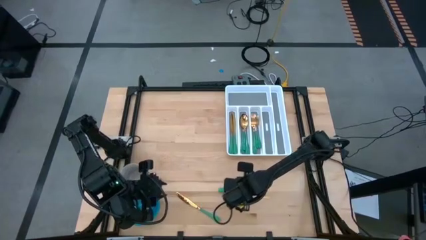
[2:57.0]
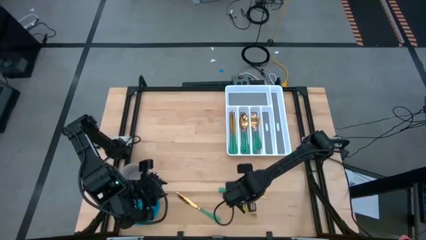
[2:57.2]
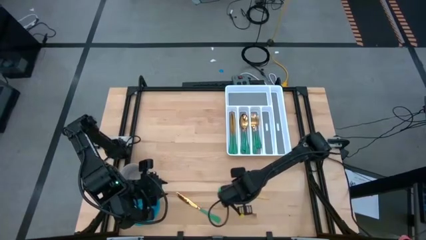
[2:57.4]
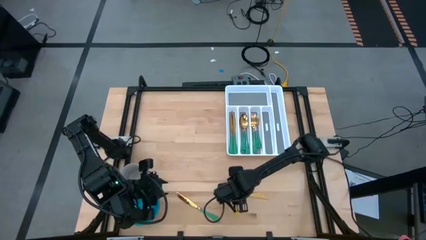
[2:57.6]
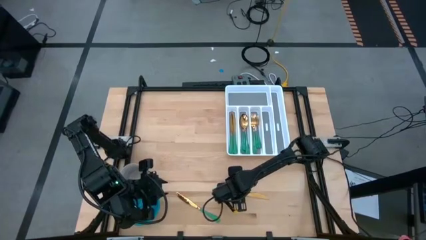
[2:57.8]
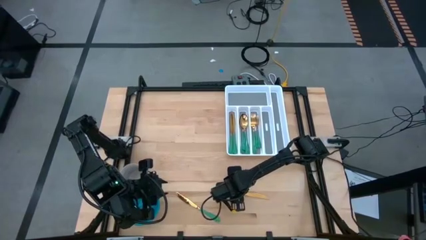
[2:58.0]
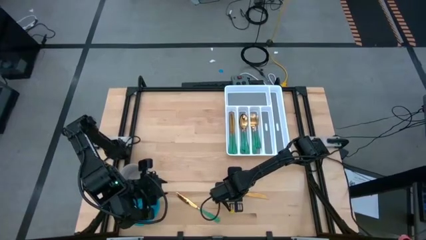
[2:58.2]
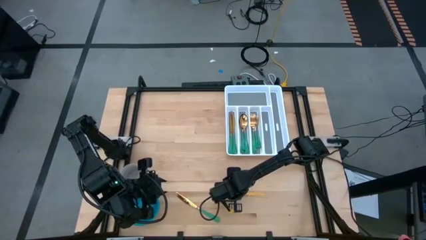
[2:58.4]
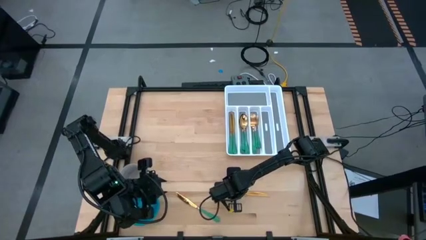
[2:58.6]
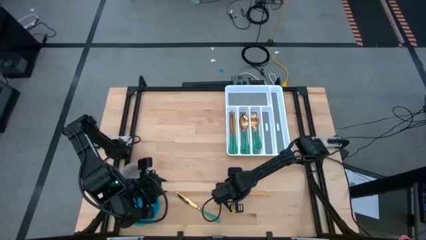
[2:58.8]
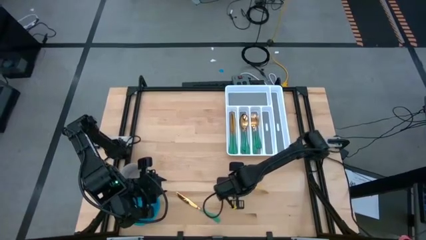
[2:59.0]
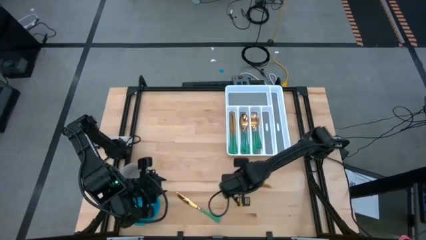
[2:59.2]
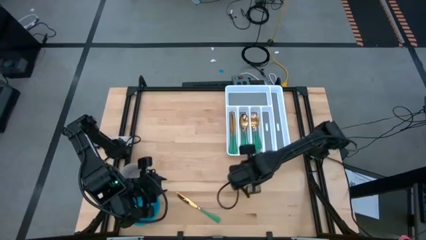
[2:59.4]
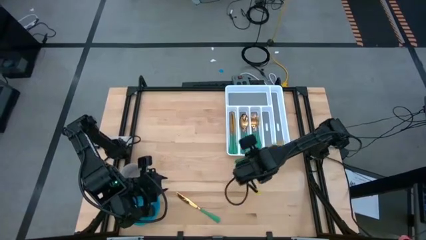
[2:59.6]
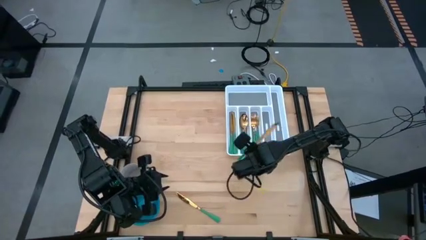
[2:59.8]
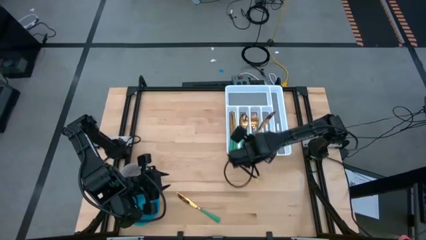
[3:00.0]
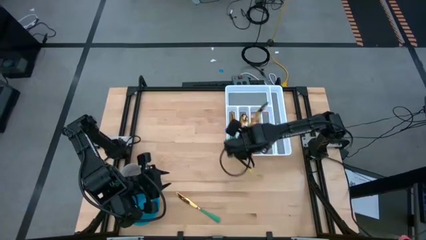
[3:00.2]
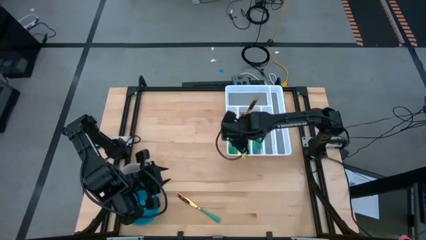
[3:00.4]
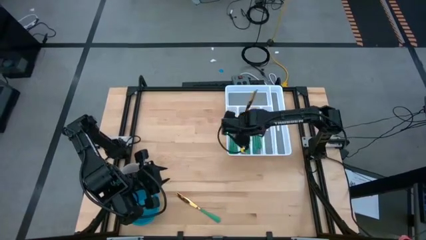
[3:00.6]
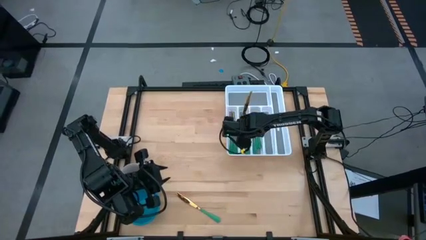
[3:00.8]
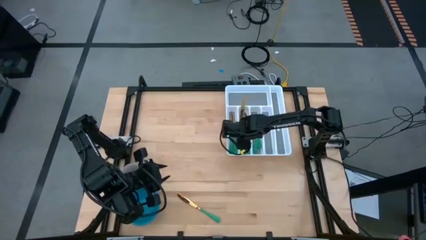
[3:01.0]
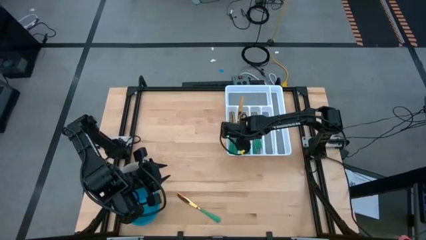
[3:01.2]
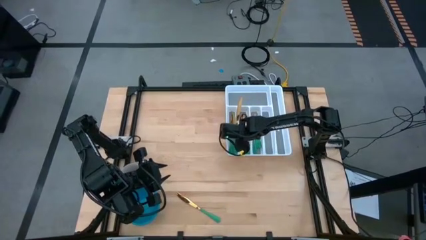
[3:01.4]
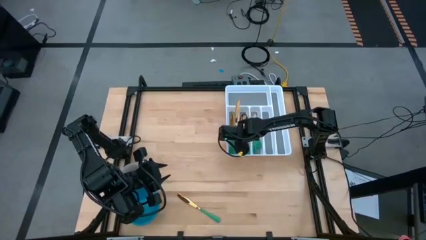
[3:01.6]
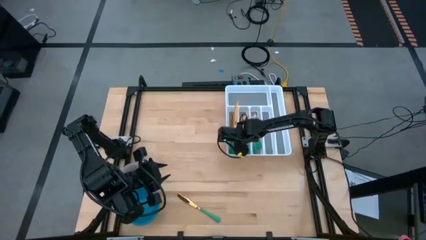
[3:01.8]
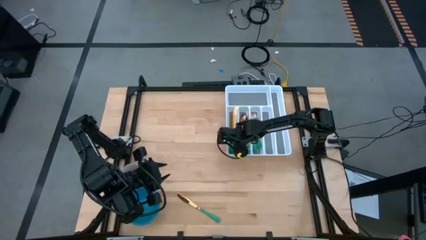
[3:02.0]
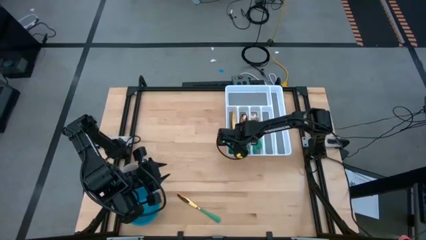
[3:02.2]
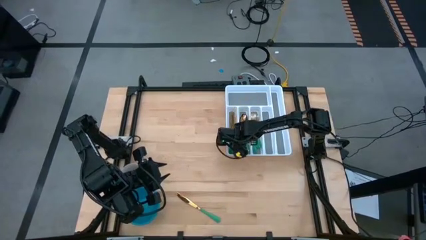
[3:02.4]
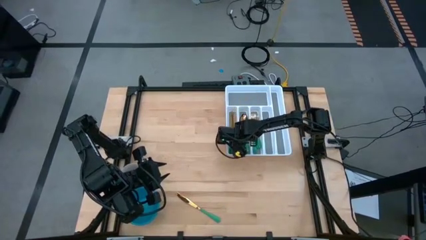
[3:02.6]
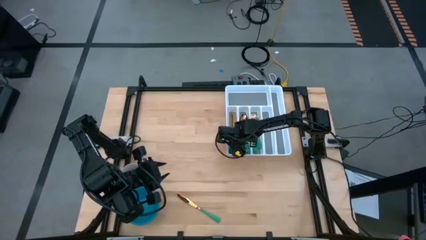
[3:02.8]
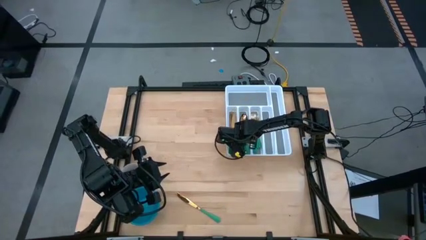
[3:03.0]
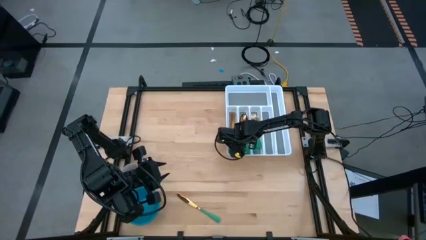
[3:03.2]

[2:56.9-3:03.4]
Task: Sort silverware
Put the right green table knife into the white cutlery tray

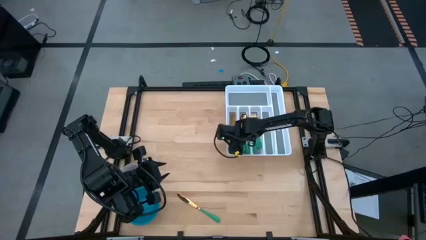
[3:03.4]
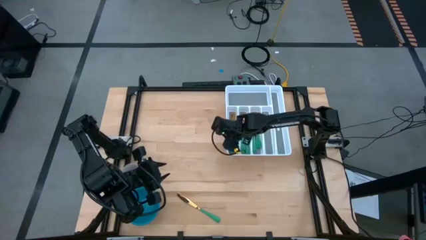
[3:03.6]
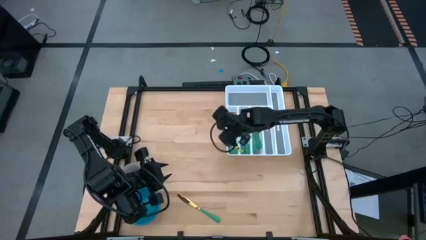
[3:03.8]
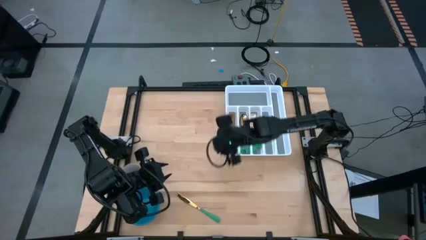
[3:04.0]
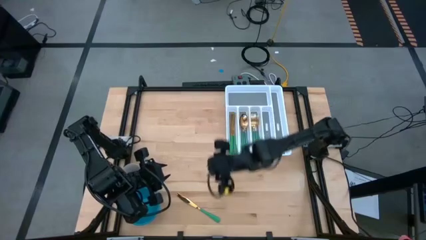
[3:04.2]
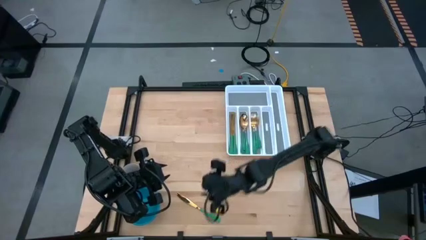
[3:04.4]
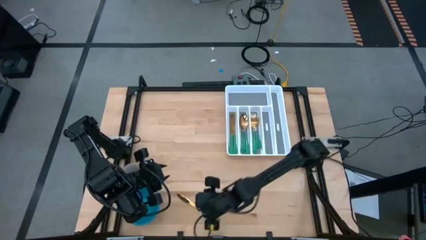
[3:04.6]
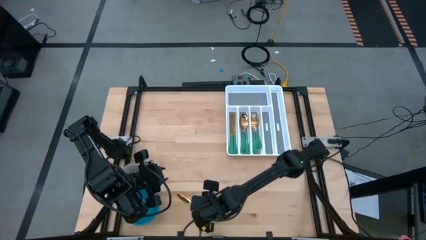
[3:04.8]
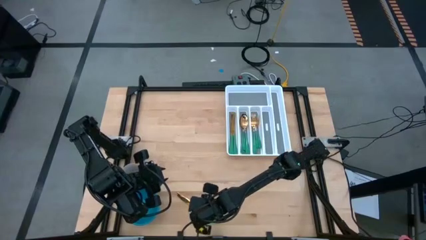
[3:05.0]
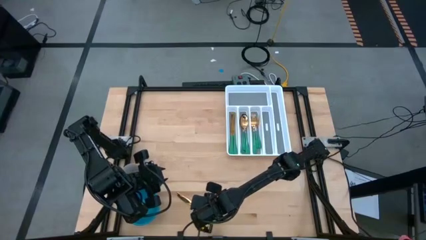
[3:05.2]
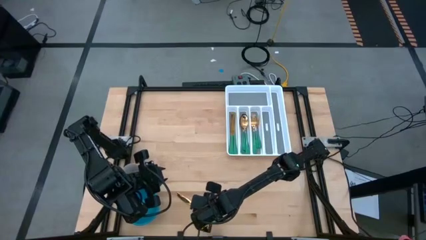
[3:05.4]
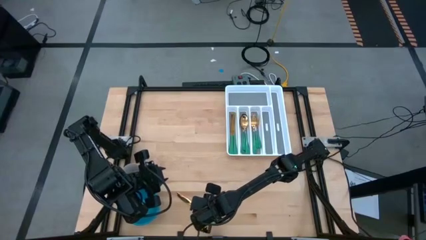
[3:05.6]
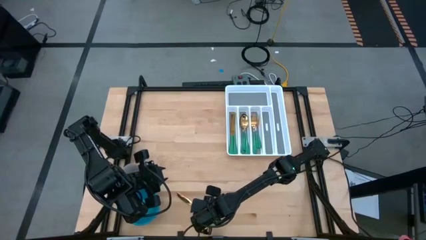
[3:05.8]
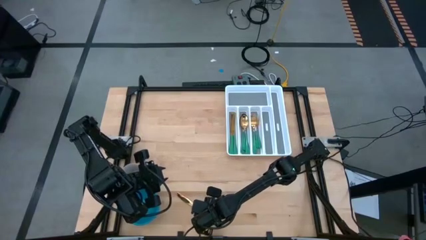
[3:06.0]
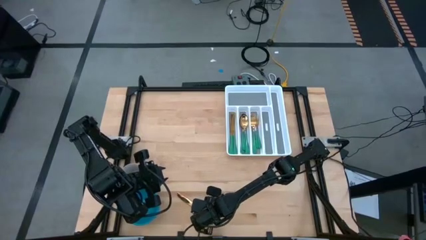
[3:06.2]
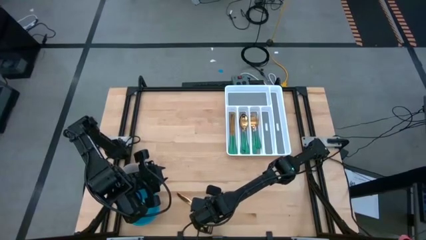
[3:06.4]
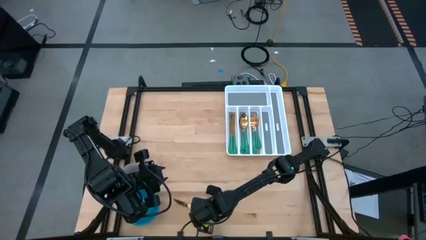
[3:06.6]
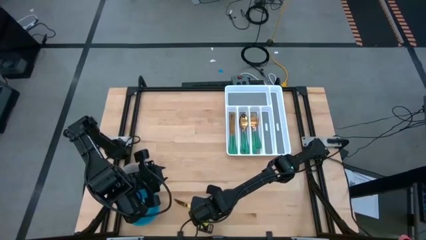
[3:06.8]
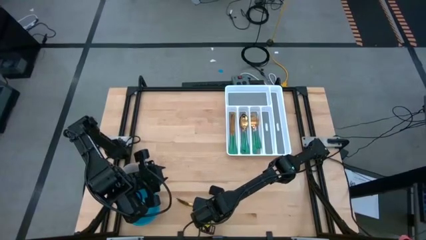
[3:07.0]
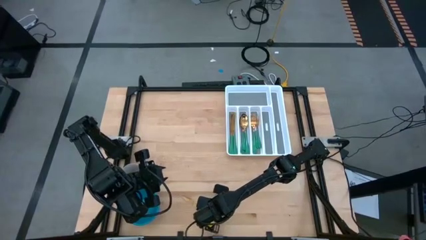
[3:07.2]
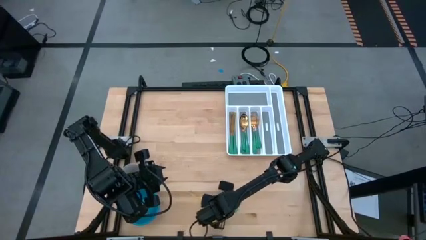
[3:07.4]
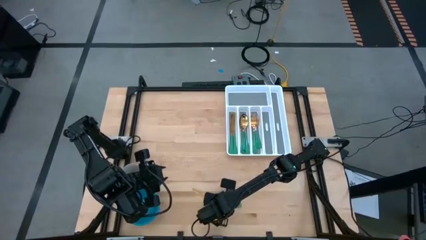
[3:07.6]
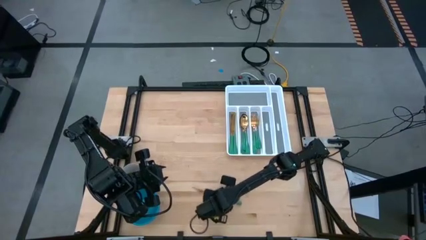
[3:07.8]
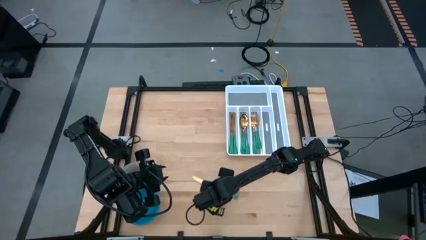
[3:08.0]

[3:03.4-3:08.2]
Put the green table knife into the white cutlery tray

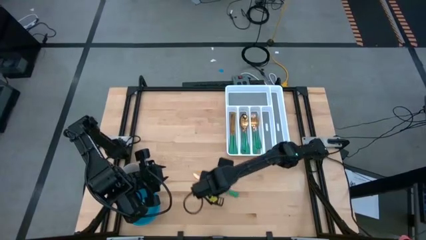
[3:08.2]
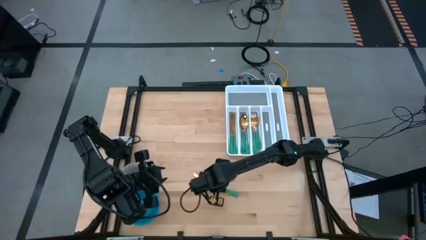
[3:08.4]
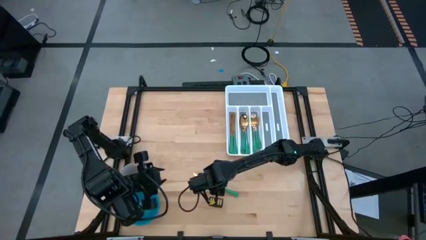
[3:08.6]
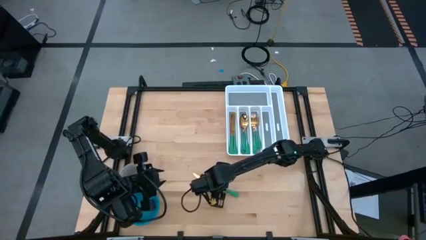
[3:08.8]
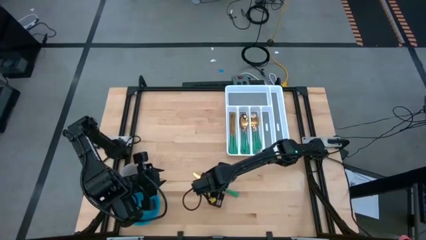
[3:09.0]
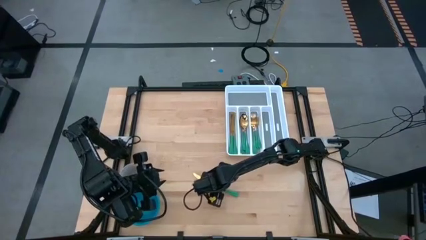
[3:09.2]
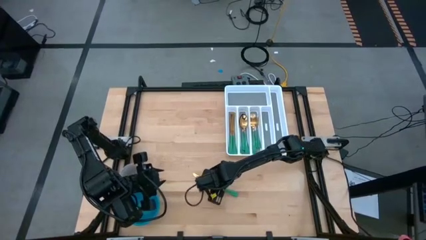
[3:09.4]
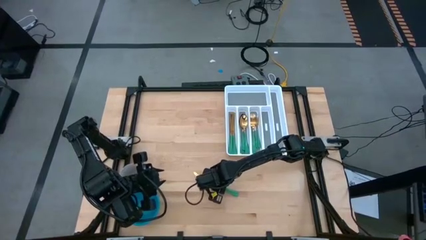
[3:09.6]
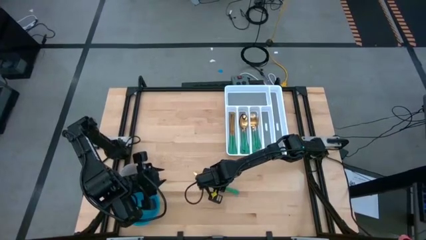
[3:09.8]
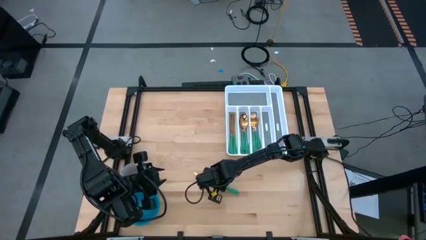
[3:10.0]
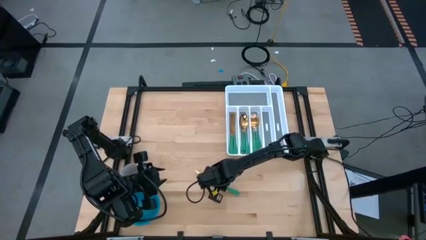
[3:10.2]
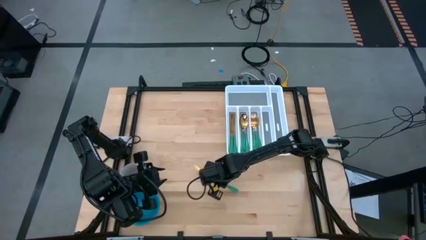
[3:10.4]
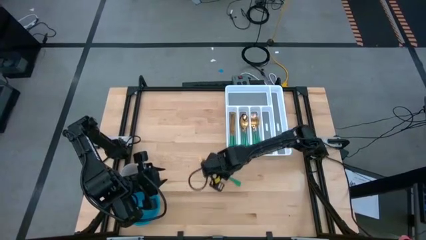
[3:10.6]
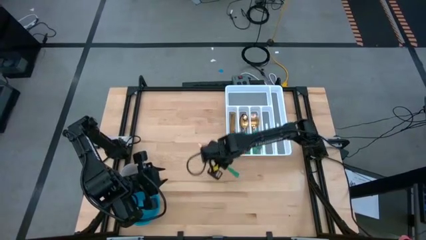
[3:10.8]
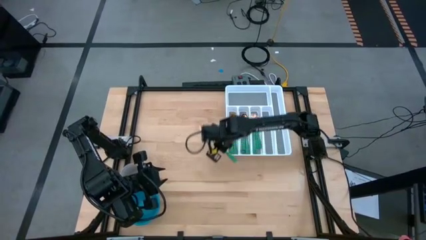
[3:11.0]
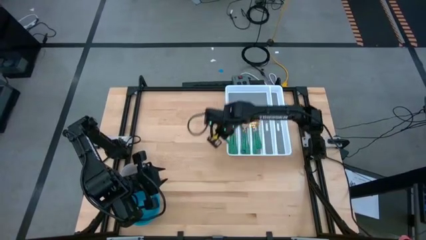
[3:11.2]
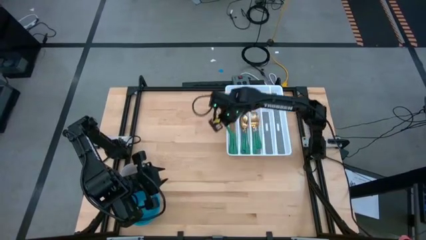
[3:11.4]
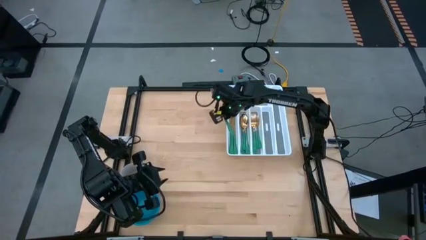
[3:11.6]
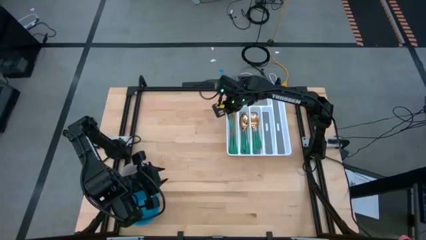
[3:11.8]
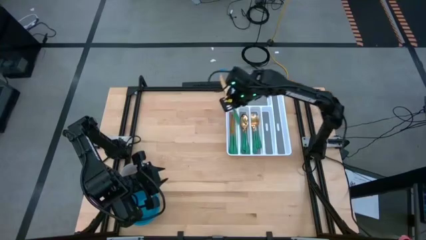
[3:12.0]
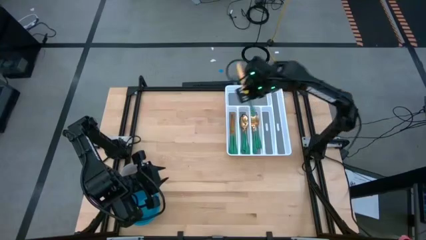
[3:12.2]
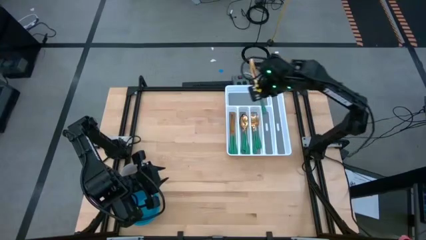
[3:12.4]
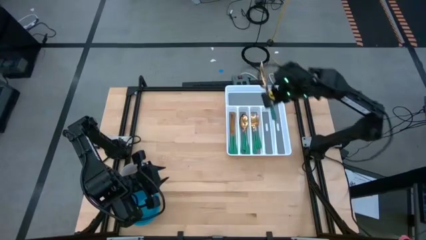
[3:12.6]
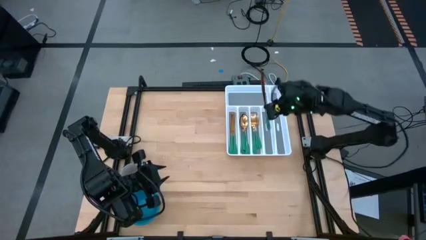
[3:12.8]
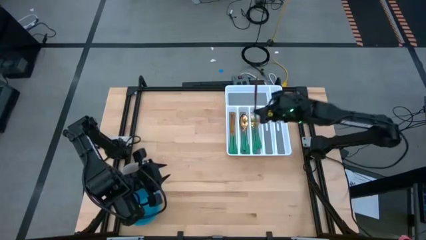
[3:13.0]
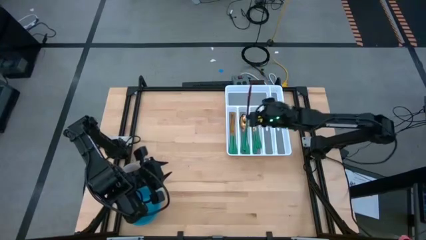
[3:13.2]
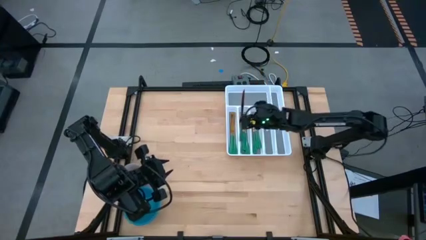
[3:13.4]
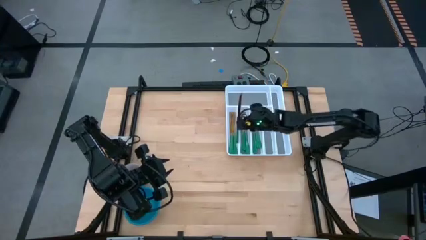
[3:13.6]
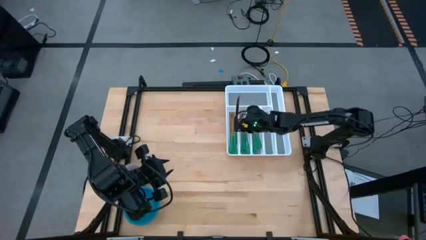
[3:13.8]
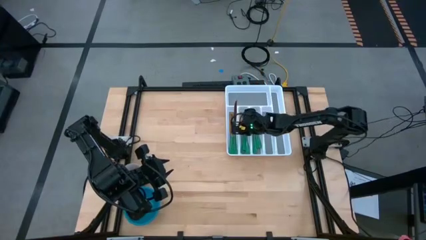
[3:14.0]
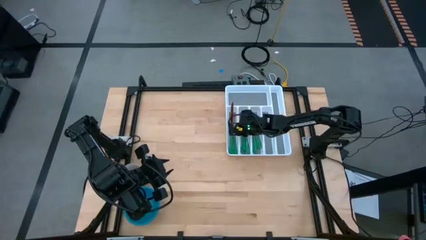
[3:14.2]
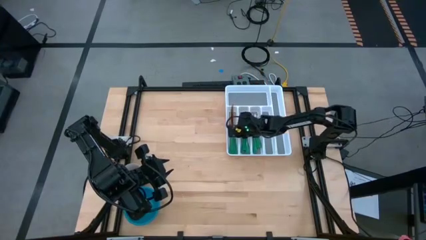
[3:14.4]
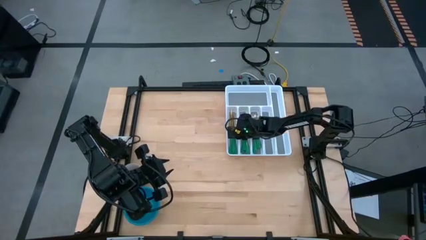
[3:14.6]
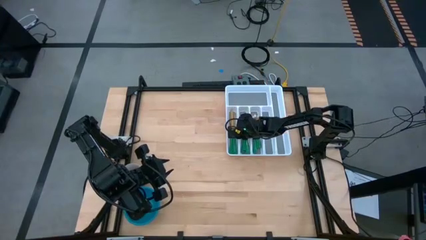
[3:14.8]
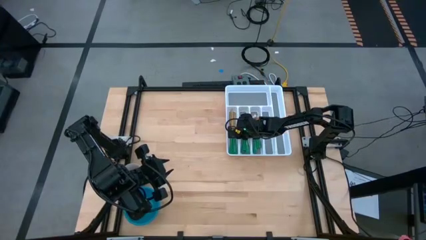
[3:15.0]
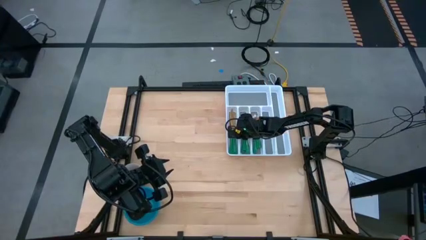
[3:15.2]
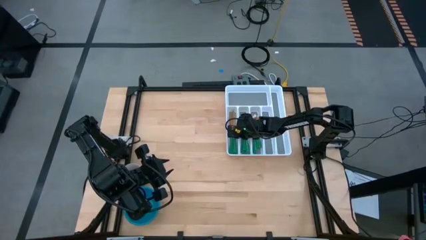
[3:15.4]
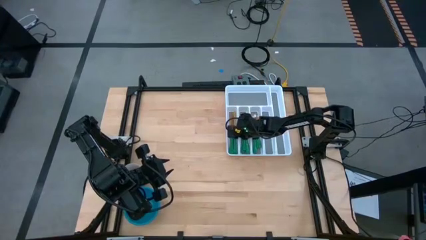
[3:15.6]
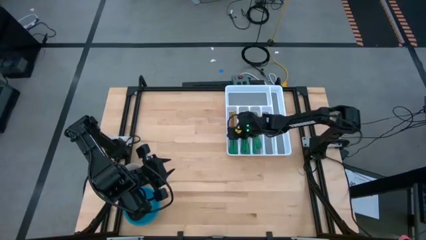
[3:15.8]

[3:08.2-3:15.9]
Put the green table knife into the white cutlery tray
